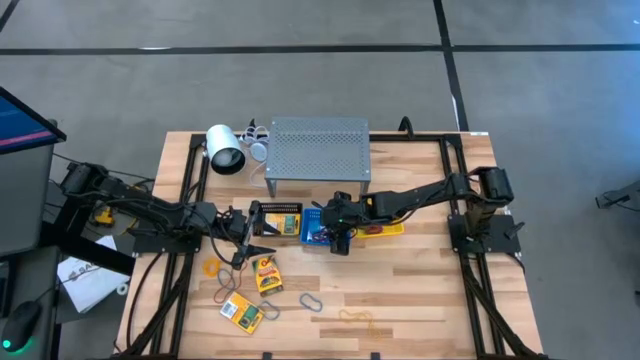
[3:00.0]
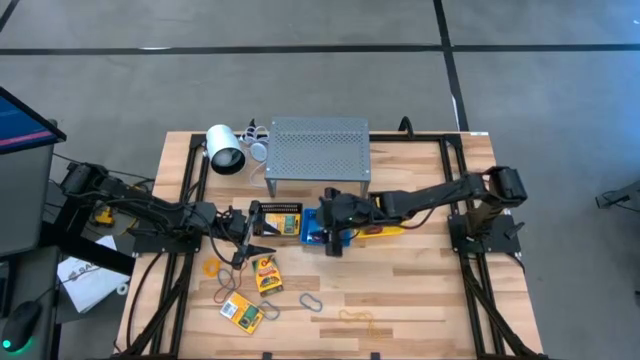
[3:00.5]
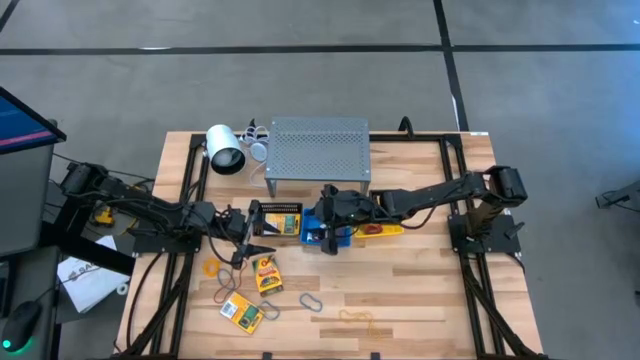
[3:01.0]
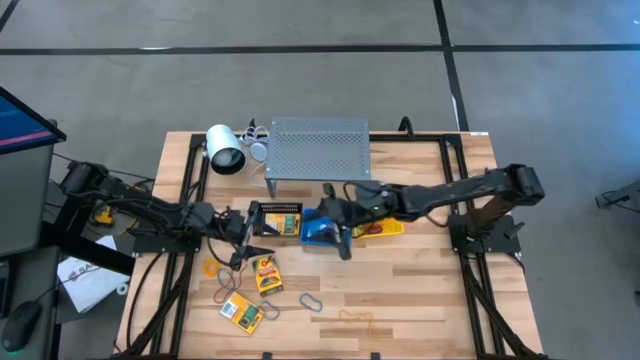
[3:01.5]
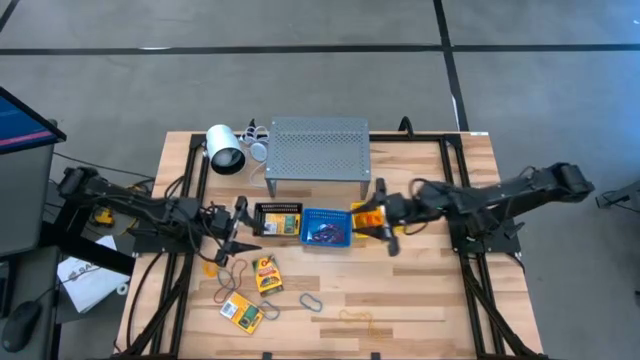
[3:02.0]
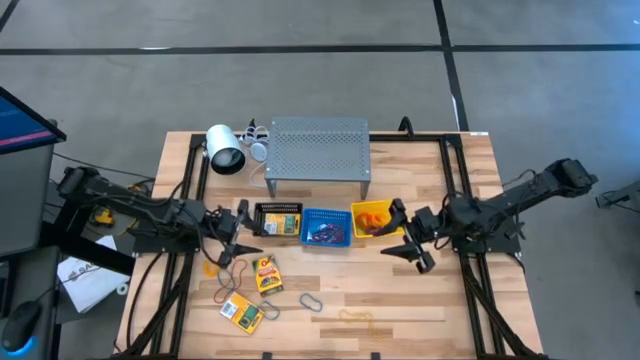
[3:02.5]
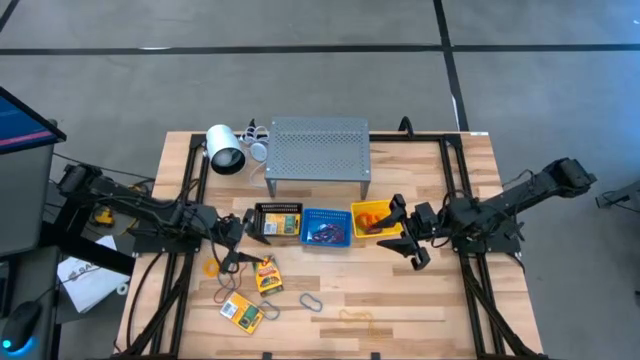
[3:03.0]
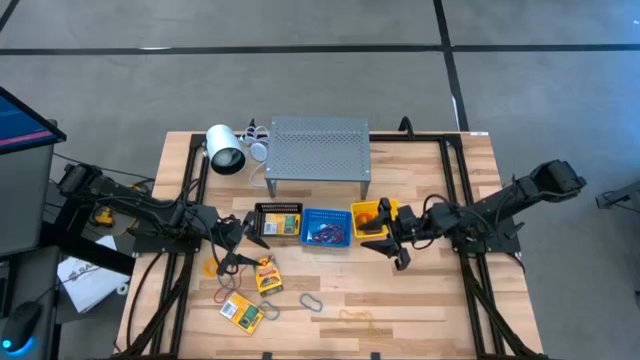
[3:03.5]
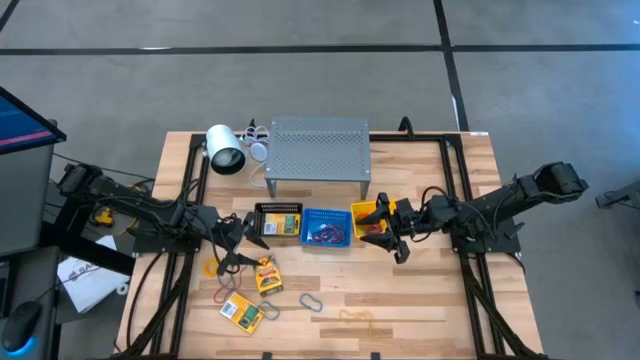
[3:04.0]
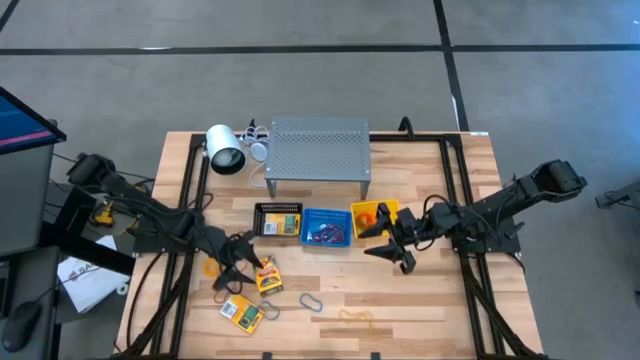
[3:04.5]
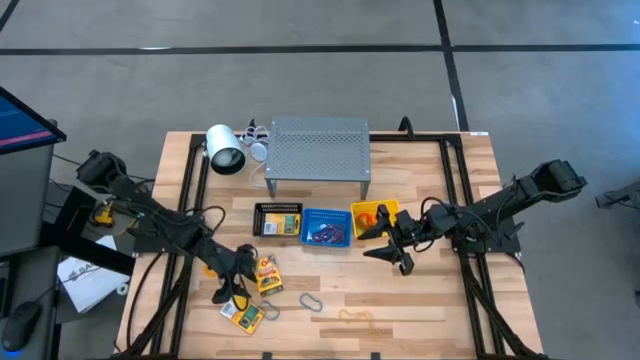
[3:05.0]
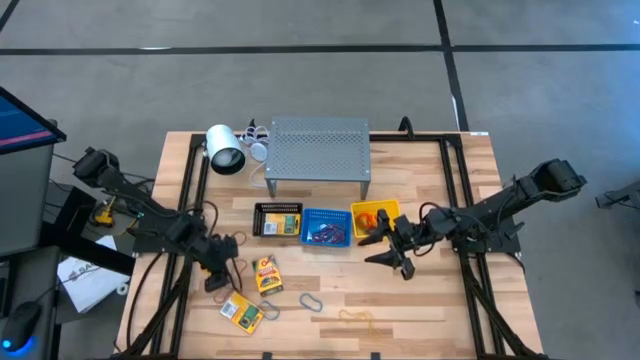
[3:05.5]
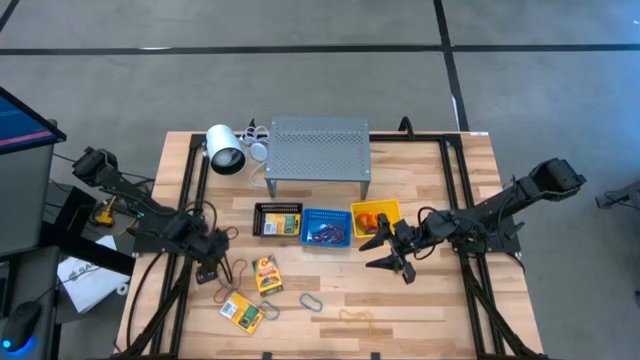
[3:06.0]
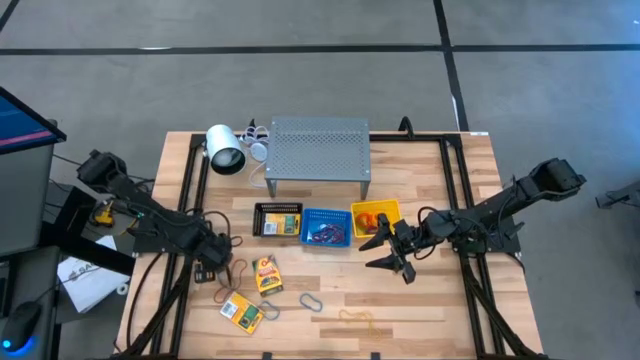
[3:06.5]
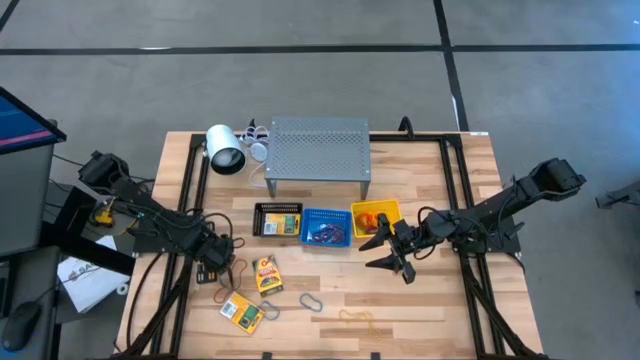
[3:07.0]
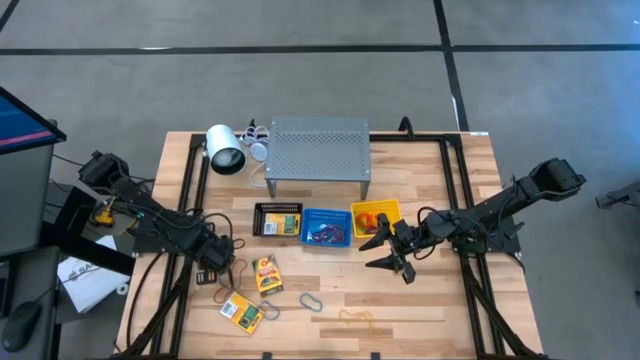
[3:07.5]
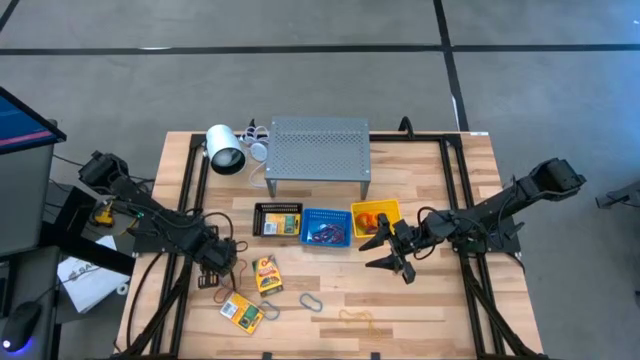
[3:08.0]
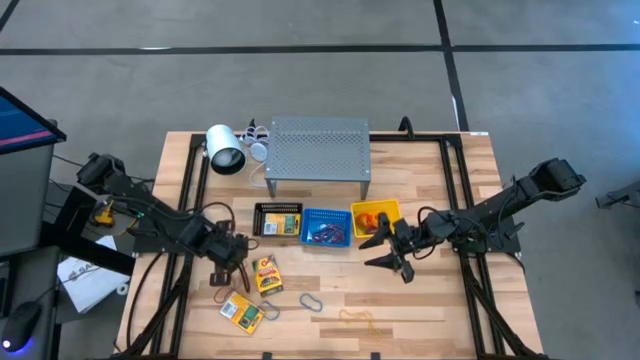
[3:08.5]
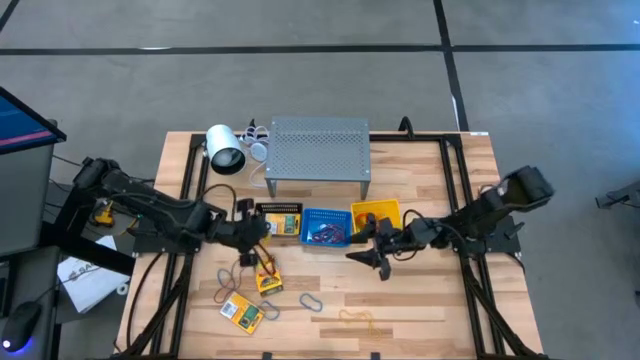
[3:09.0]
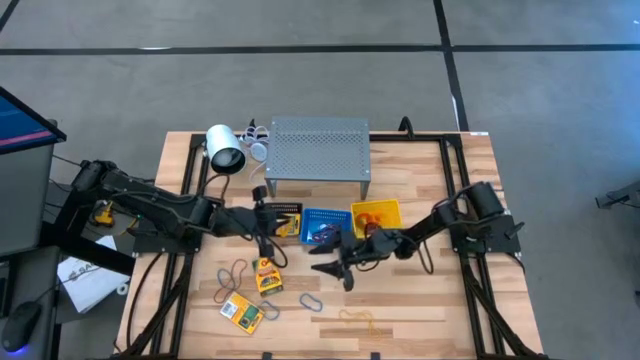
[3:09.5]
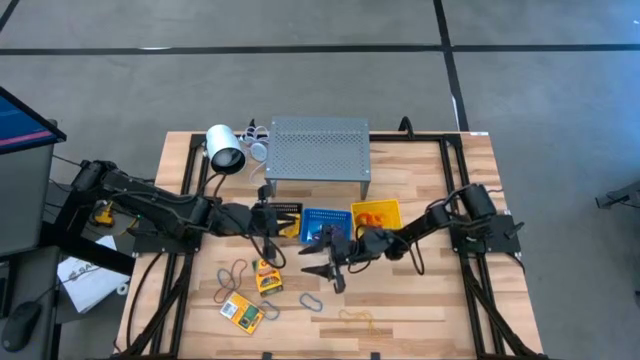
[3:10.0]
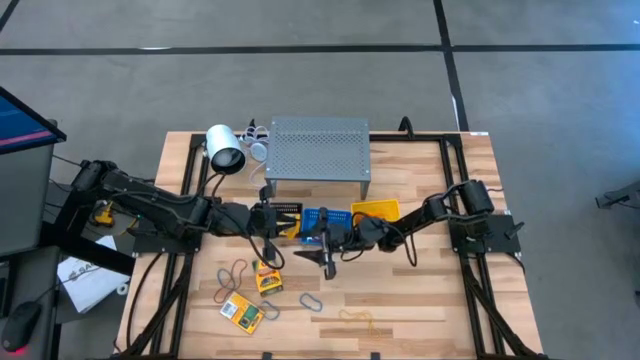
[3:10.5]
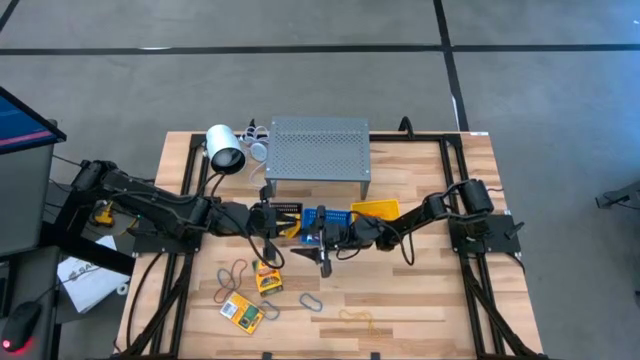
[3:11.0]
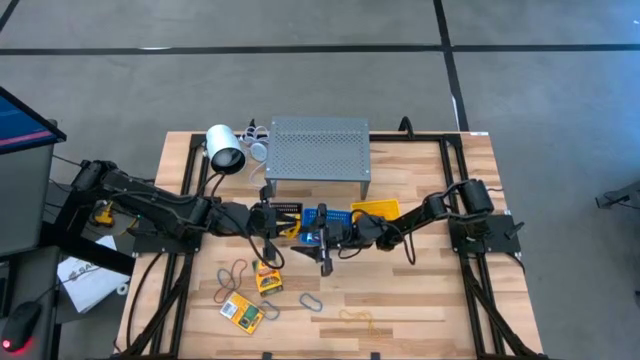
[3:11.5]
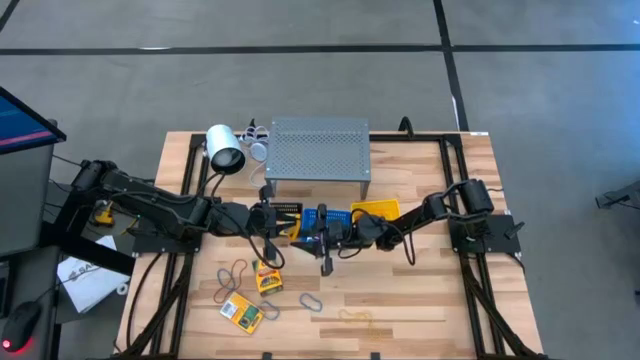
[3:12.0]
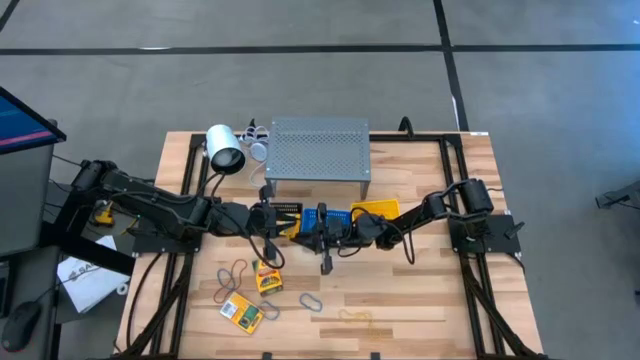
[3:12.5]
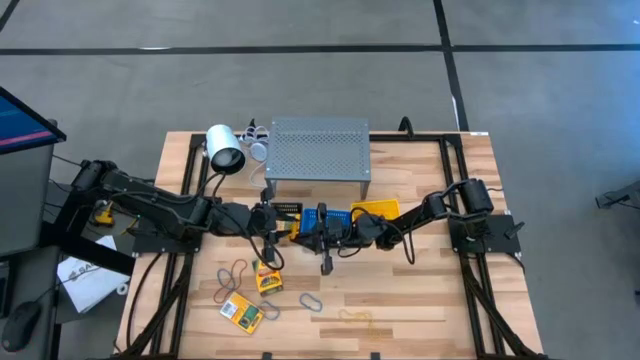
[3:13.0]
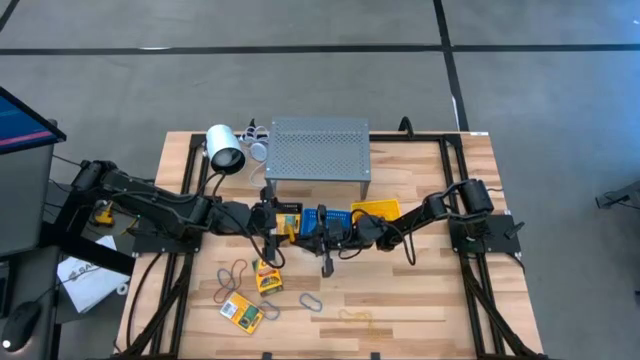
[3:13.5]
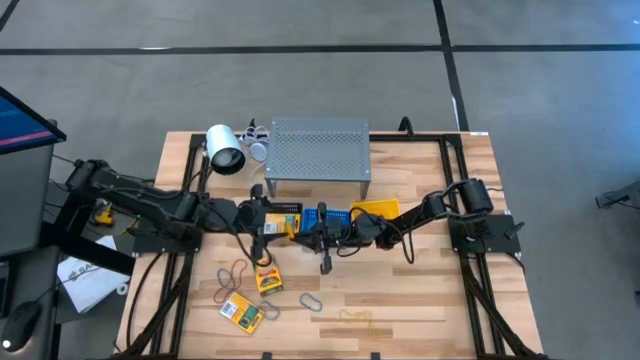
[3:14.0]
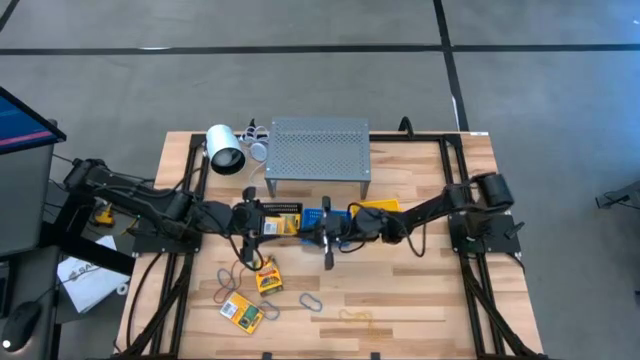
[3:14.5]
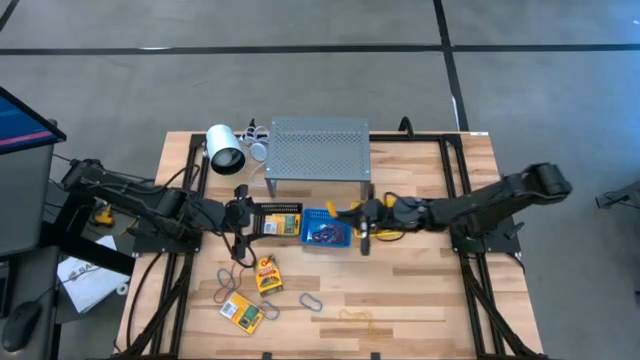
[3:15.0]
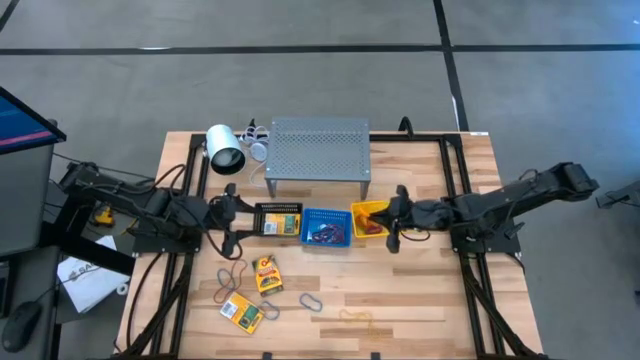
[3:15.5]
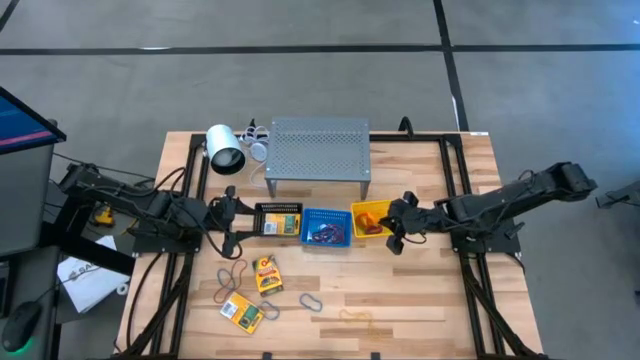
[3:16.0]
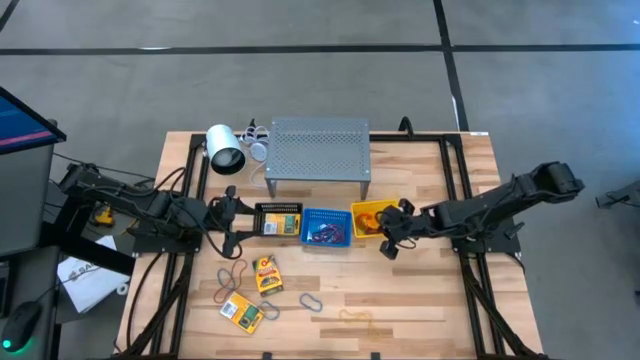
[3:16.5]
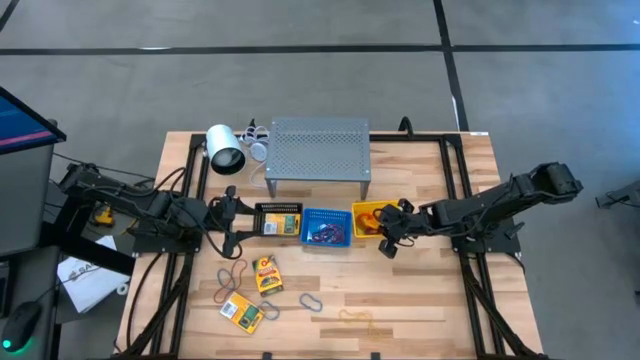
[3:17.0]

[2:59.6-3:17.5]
Task: Pick & Place Office Desk Supplies
Put the yellow spiral keychain into the yellow bin

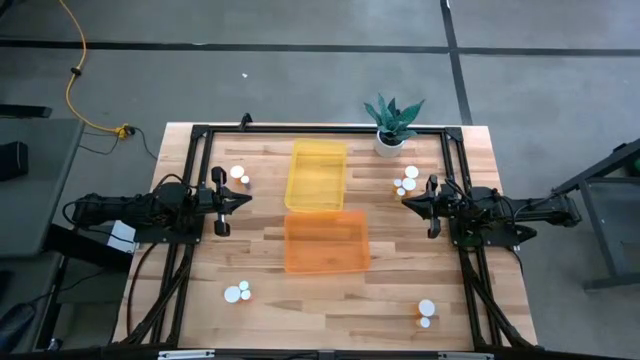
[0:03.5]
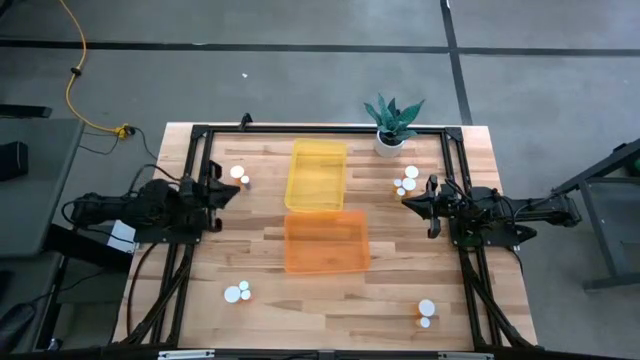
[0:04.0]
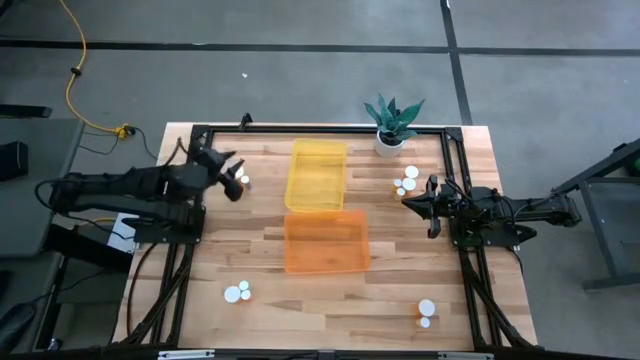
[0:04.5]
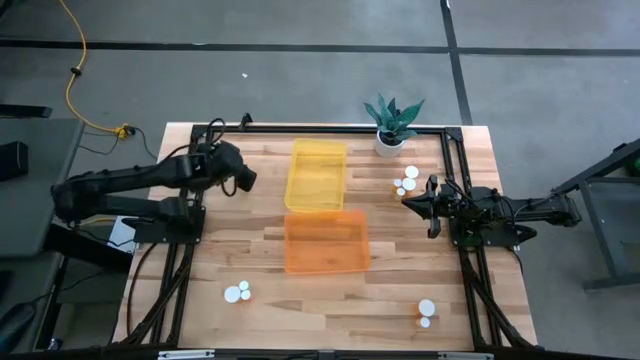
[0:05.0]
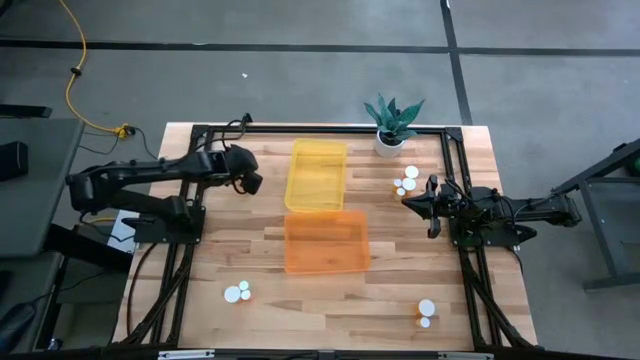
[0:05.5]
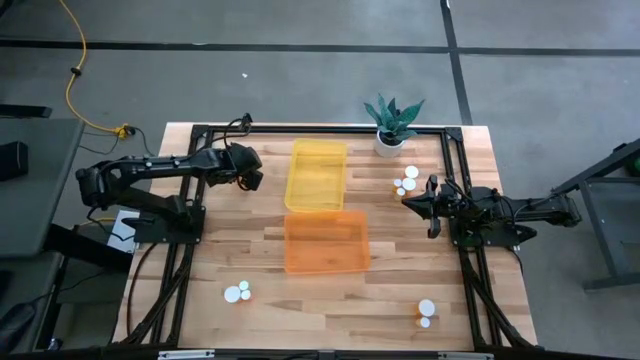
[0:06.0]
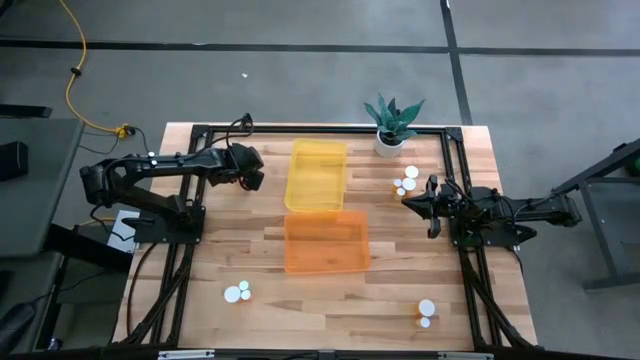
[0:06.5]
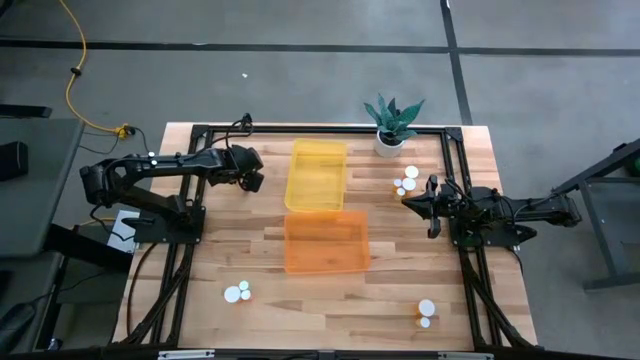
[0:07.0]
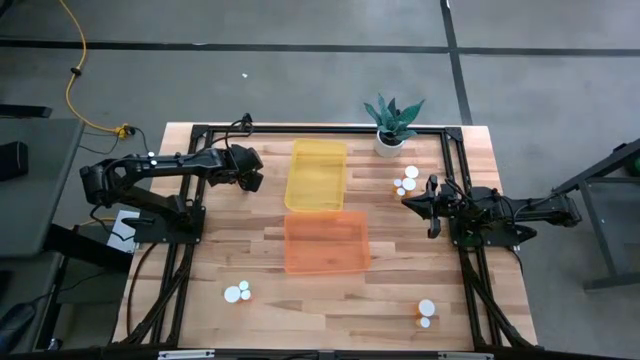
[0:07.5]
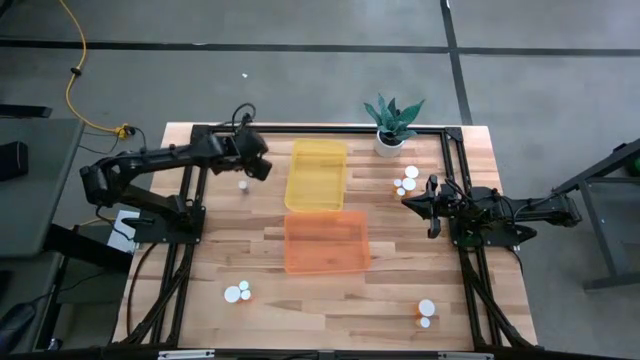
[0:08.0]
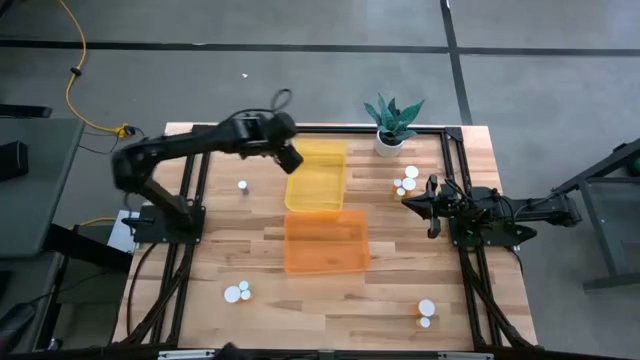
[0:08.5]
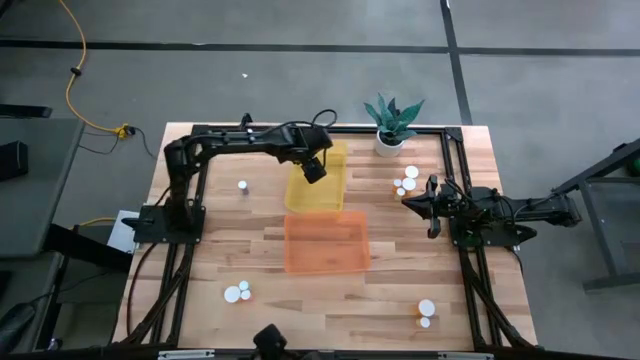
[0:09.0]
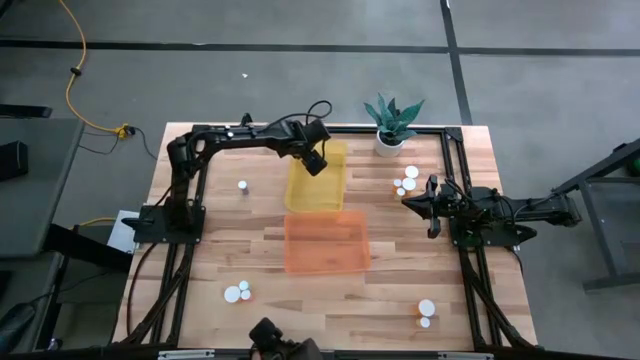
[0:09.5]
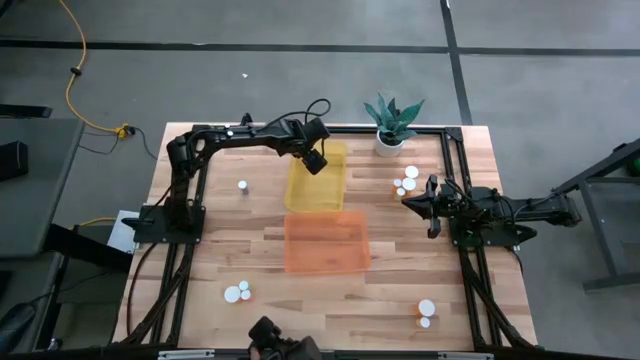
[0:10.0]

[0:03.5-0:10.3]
Task: Pick and place medicine bottles into bin by pill shape (circle, oval)
Put the orange capsule bottle into the yellow bin
